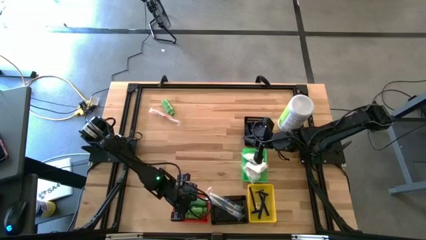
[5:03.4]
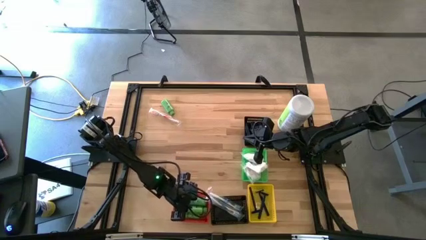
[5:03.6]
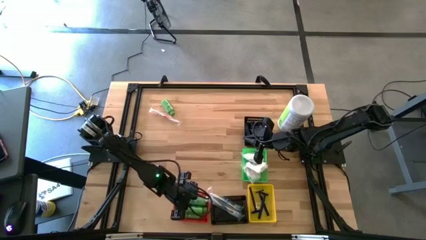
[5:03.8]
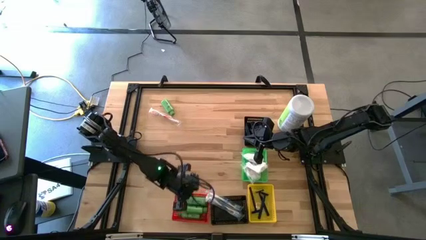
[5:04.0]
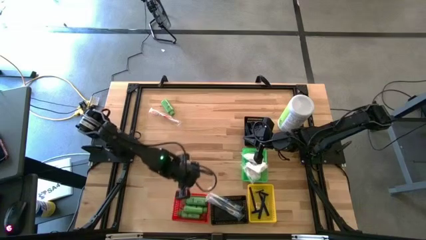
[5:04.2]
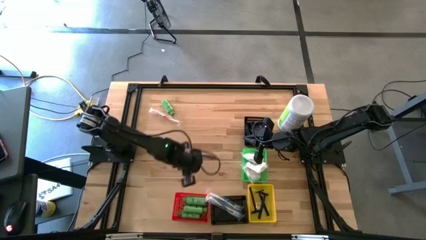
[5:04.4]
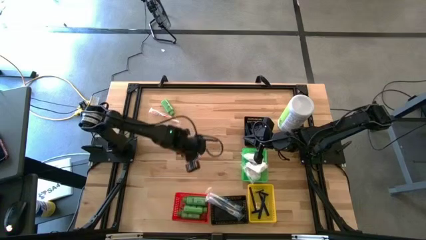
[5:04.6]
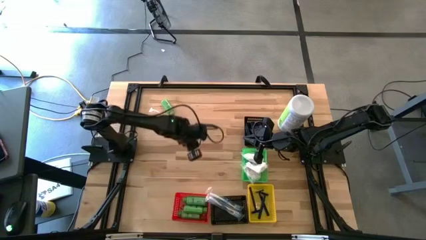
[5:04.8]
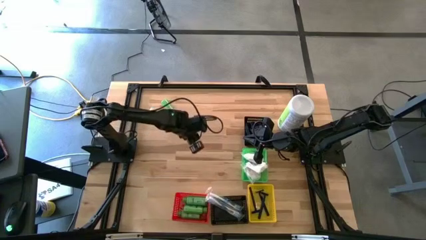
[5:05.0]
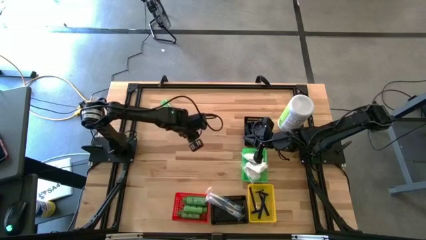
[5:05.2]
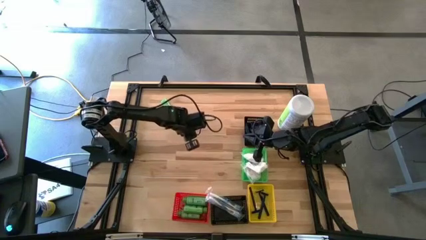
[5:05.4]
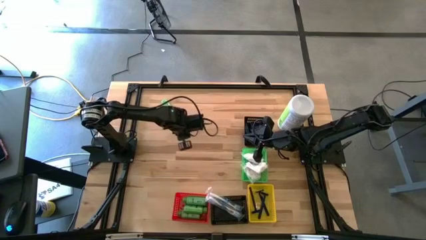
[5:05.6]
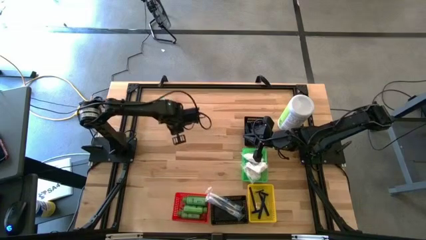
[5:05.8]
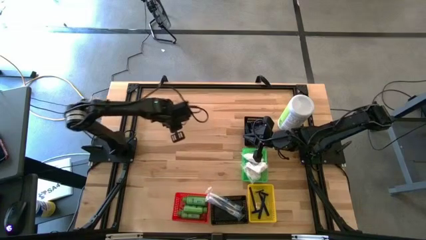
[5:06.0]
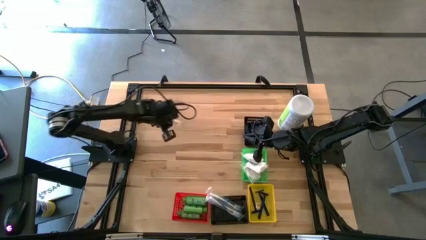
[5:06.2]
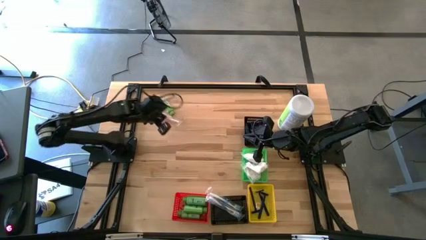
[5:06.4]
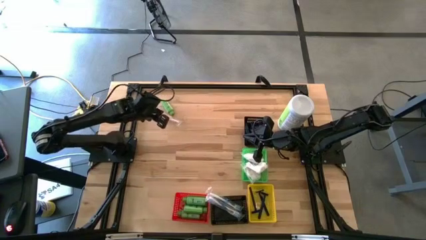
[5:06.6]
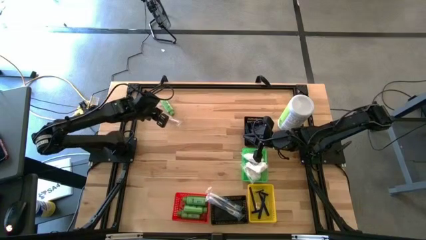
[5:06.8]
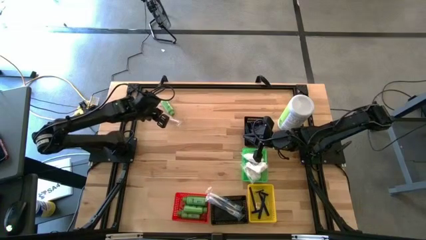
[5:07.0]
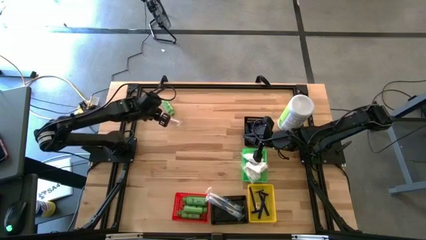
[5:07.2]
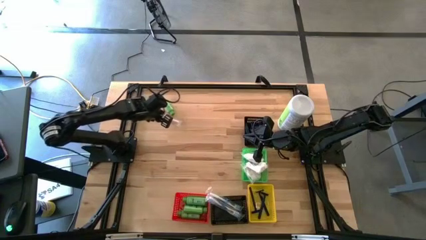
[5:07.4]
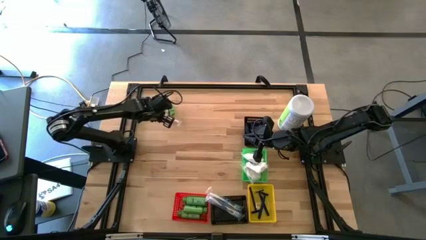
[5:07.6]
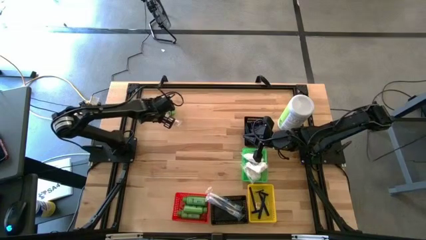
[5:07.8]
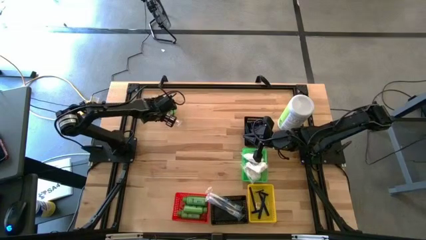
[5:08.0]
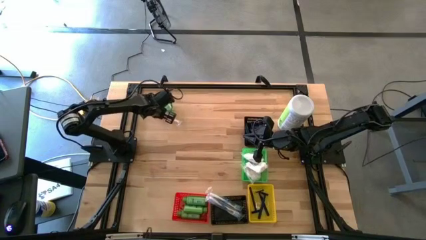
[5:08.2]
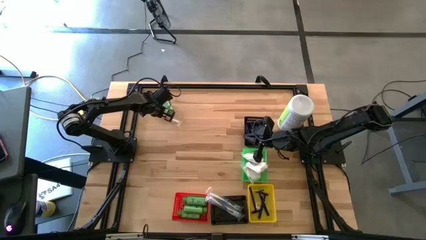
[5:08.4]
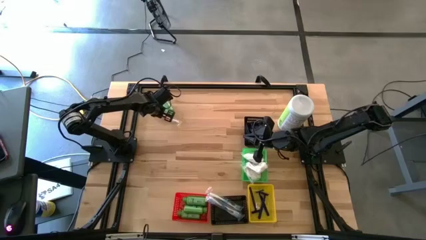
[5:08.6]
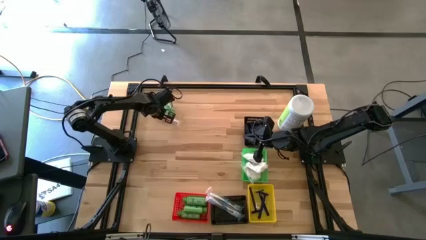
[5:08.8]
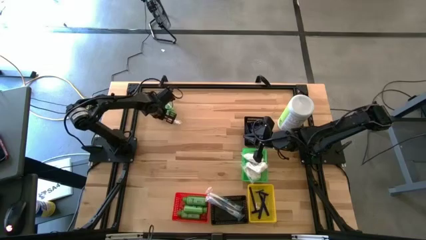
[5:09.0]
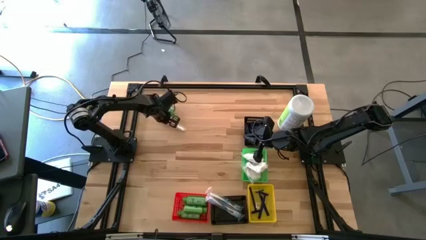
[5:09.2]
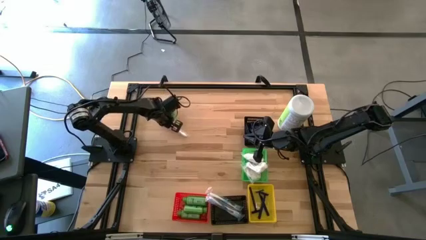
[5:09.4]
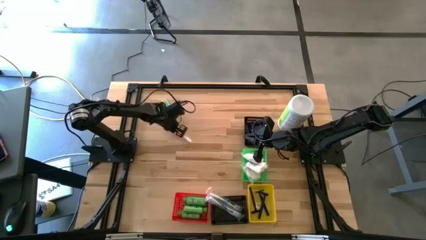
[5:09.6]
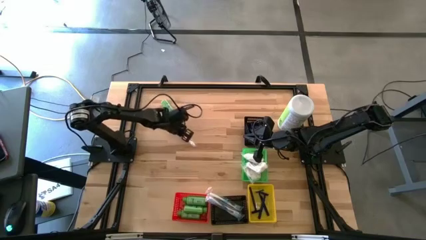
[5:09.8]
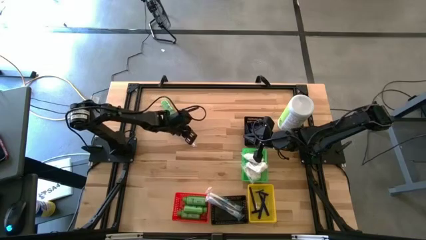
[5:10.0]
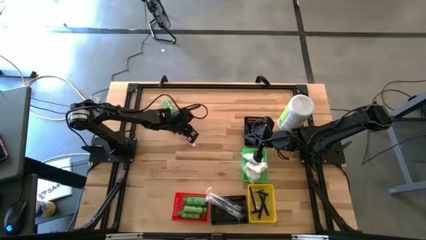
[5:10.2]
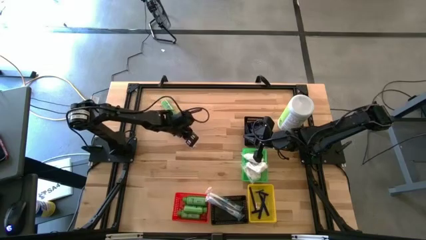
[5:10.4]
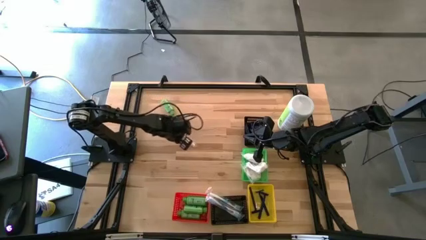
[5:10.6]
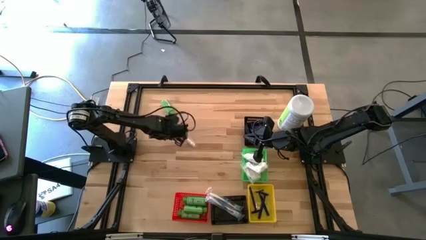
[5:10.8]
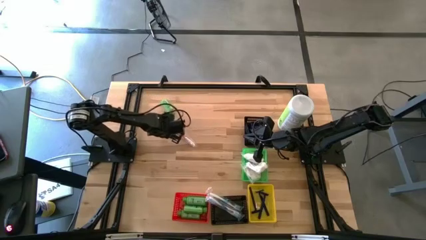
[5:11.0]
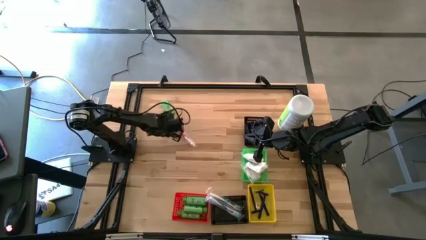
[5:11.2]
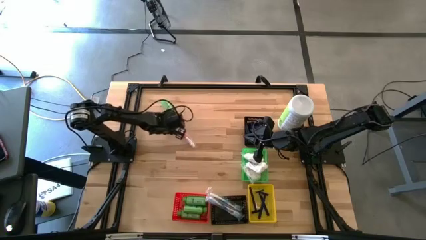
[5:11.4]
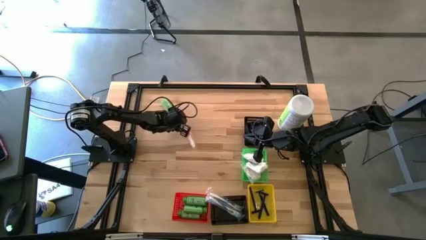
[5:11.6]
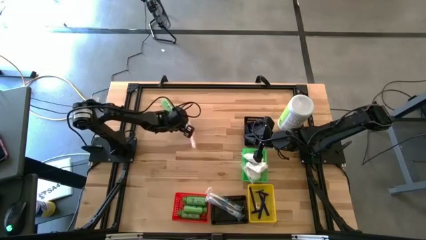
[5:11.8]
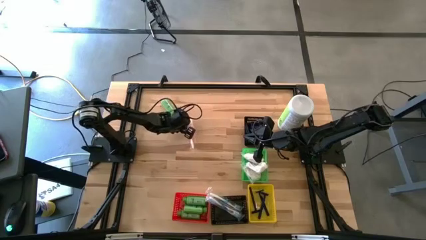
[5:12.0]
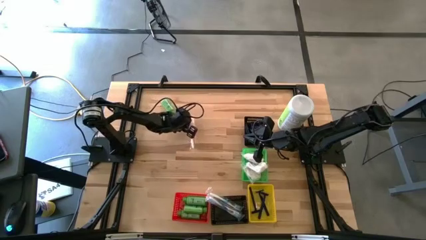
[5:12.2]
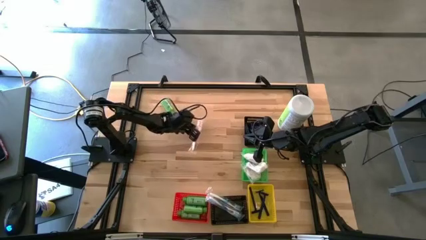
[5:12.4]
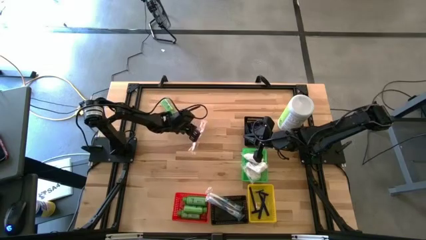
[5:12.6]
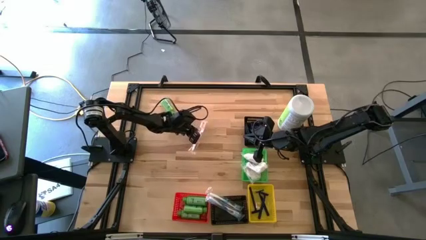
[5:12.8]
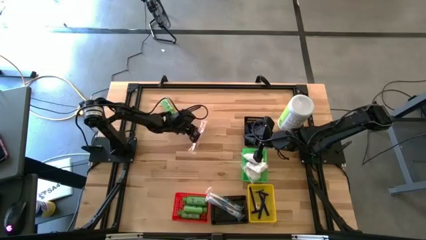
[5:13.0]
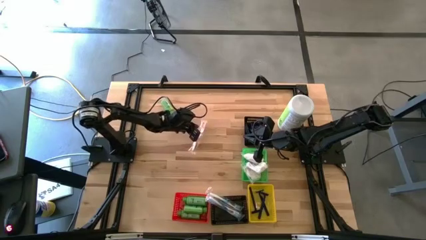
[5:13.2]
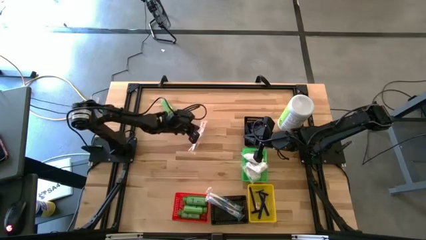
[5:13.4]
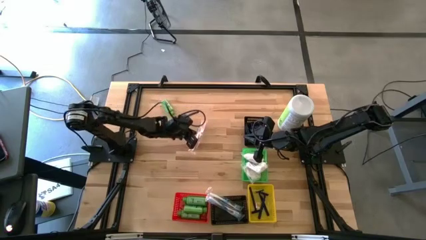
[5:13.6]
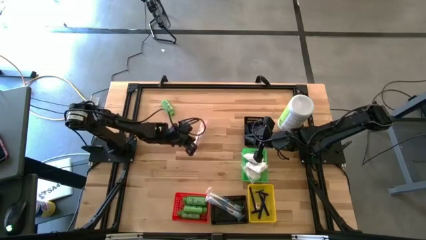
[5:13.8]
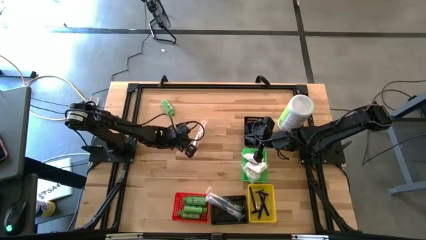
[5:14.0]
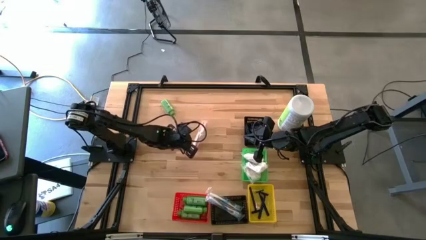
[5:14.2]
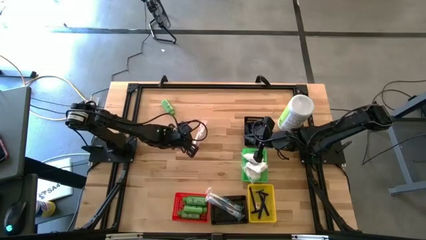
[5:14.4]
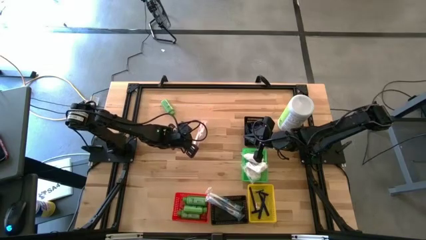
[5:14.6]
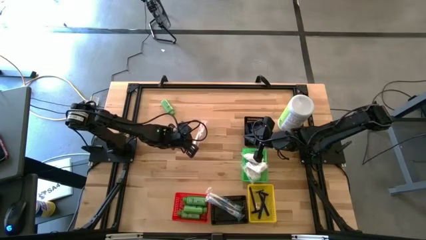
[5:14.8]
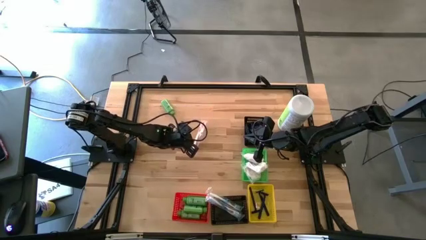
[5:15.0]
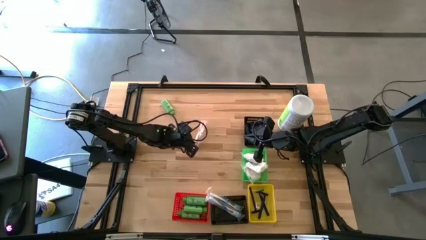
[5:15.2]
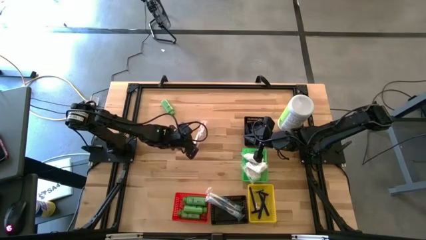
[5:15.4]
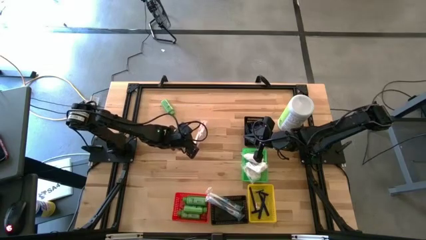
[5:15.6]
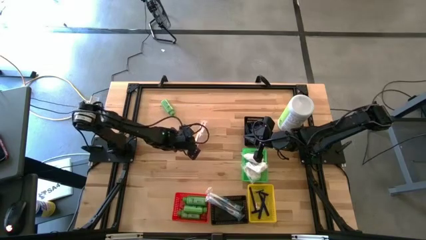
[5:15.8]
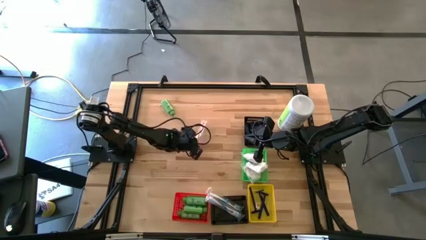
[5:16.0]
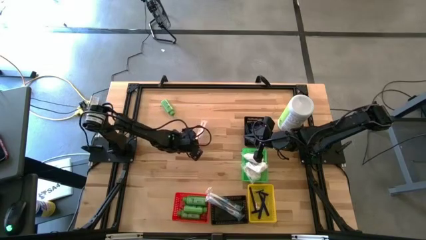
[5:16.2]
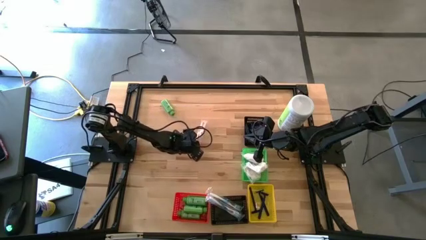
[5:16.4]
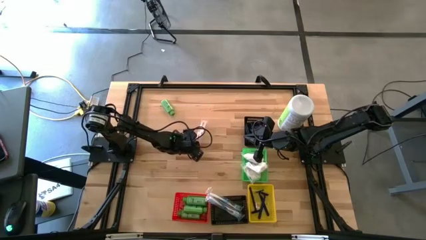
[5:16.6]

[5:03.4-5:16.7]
Task: Pick & Place Travel size toiletries
Put the red toothbrush into the bottom black bin
